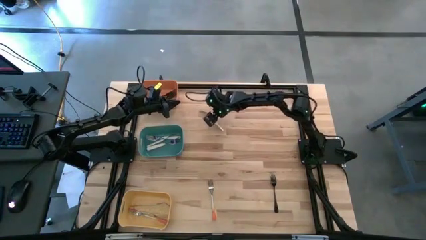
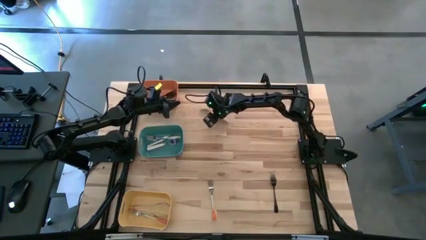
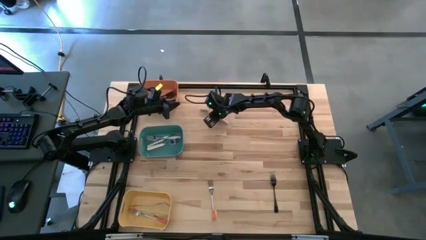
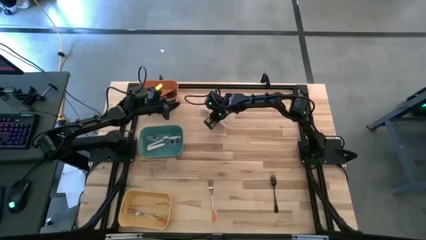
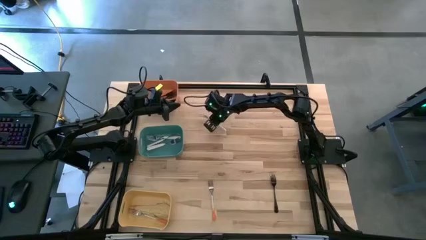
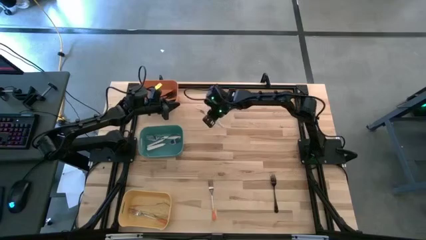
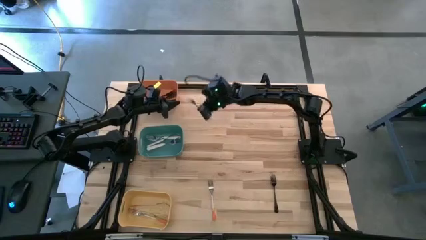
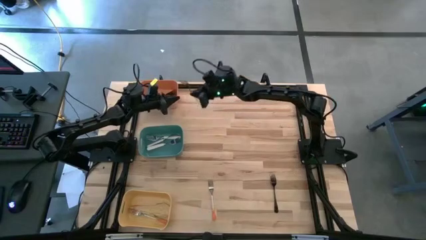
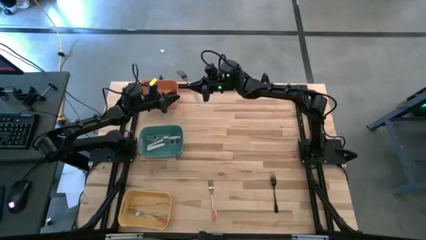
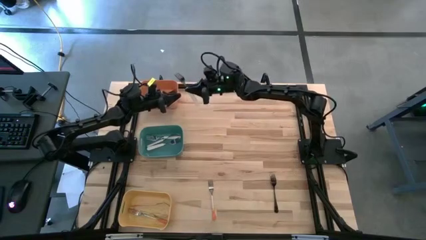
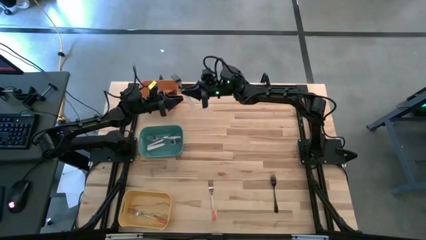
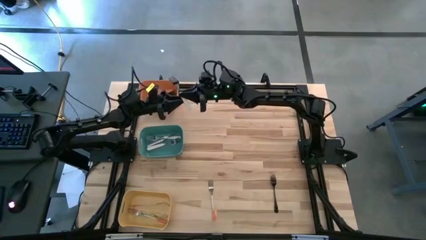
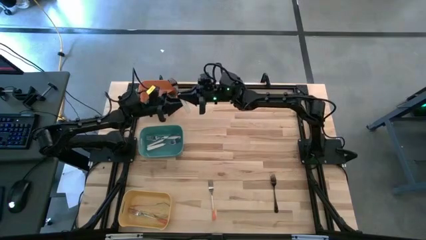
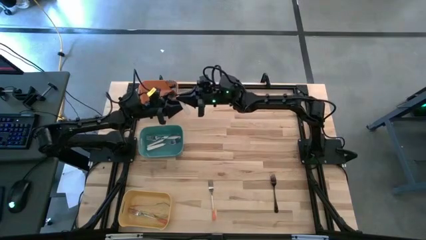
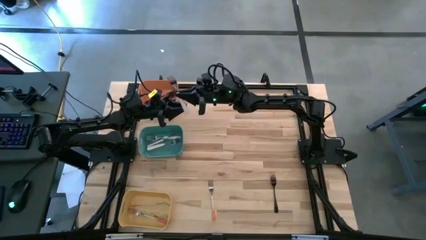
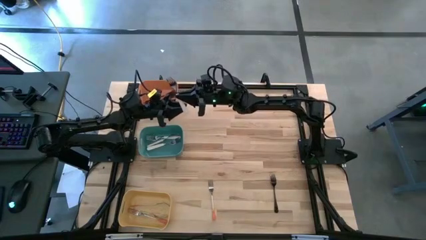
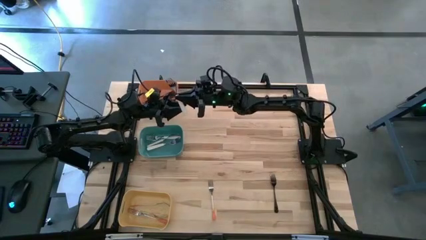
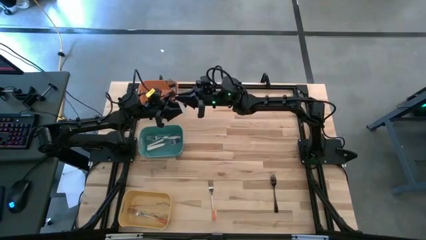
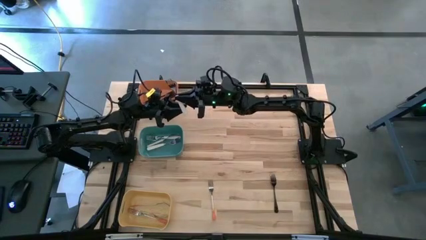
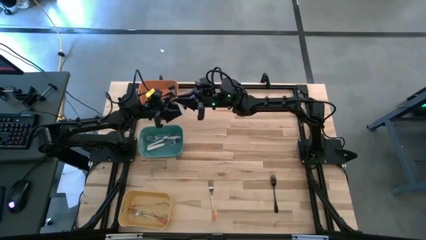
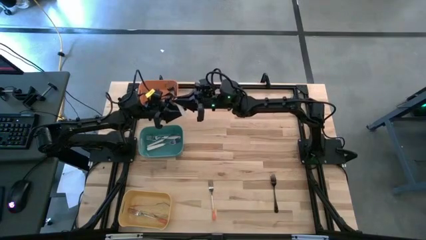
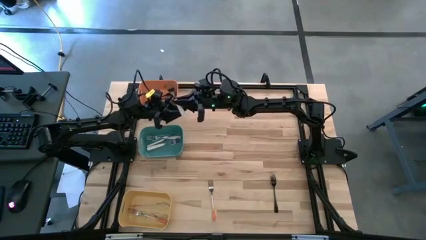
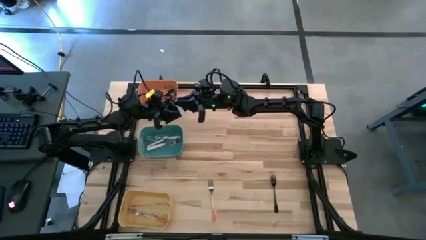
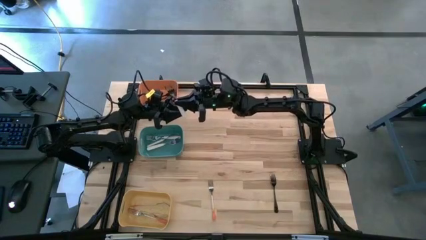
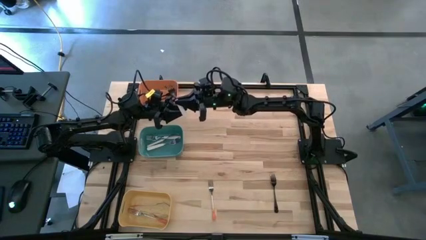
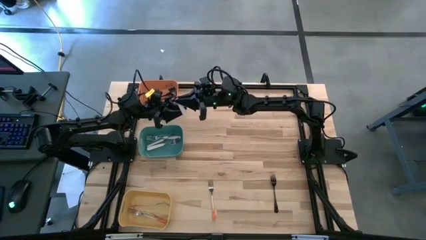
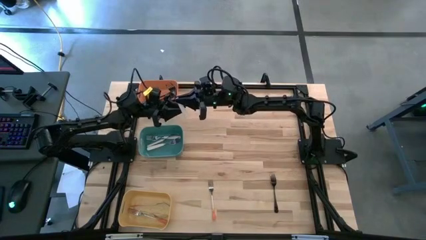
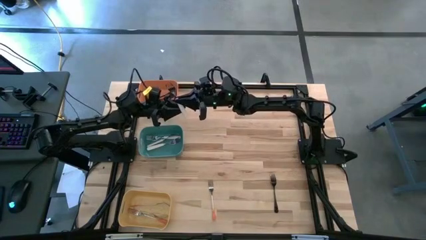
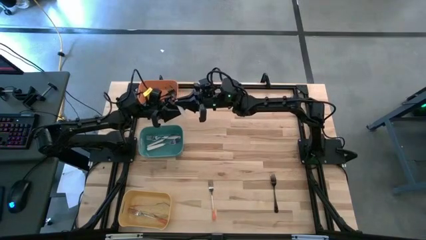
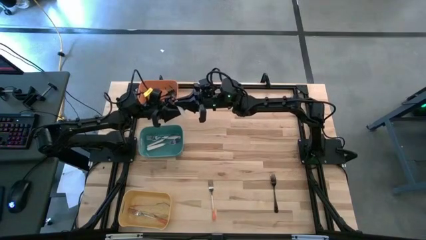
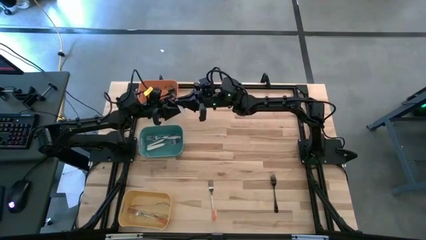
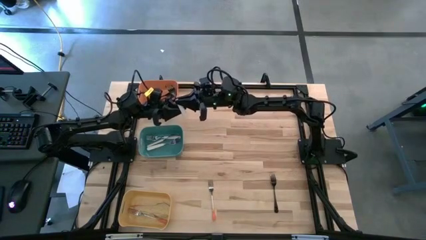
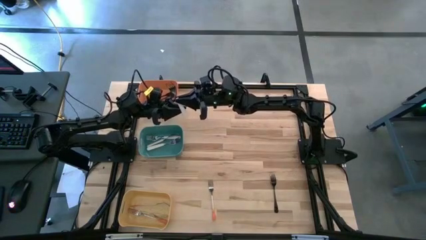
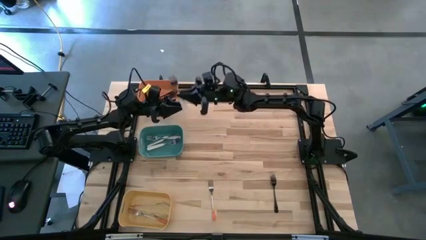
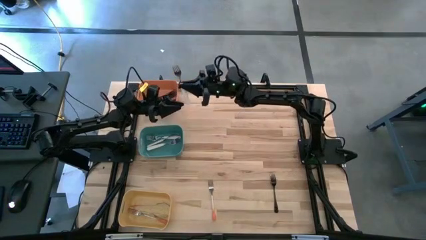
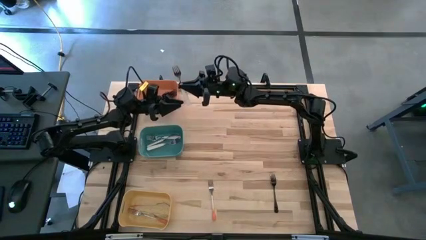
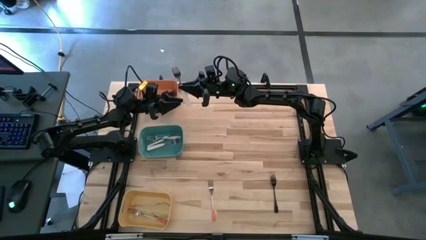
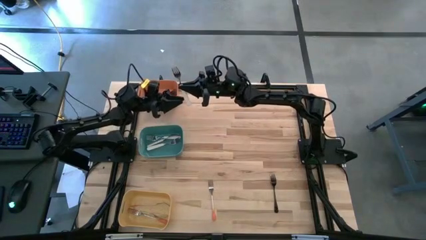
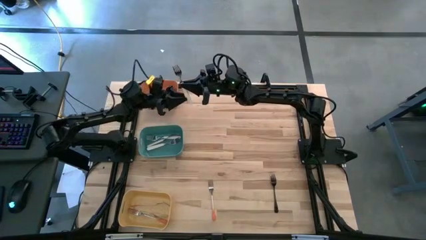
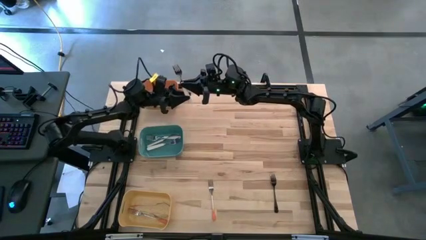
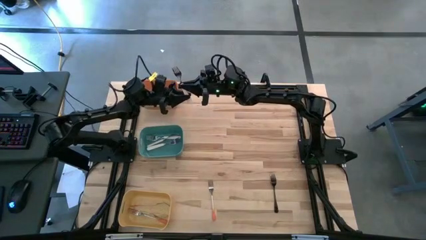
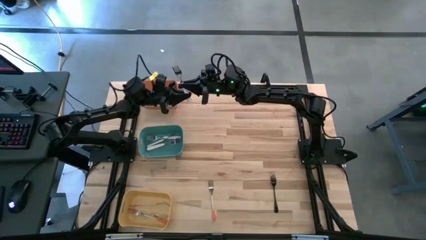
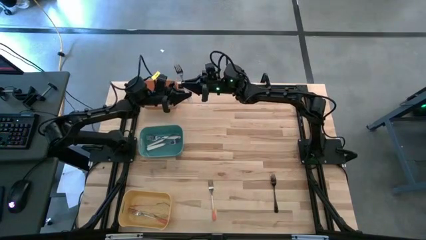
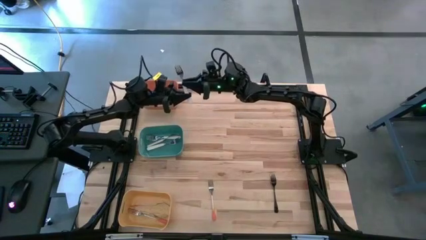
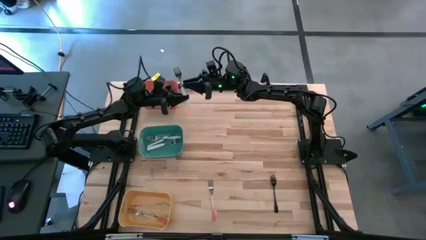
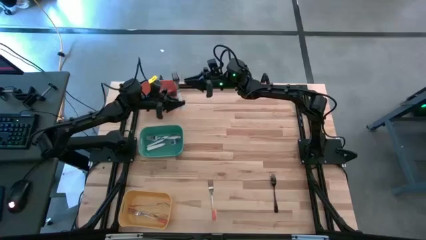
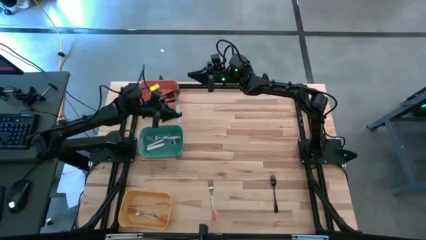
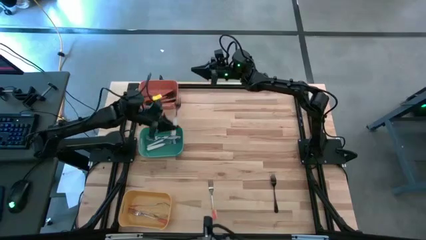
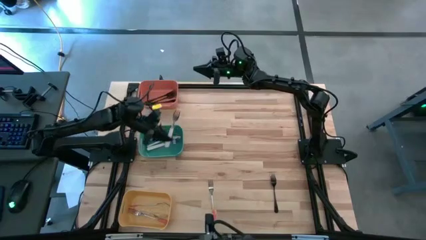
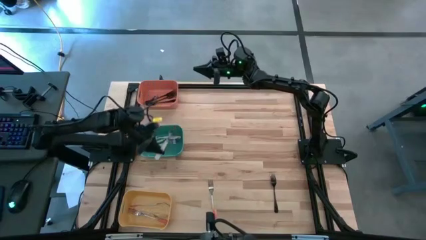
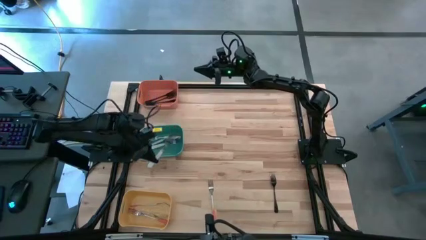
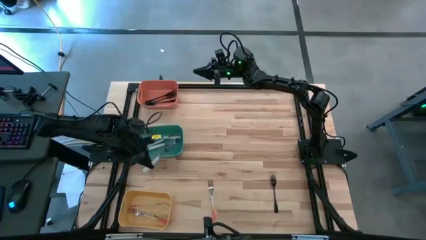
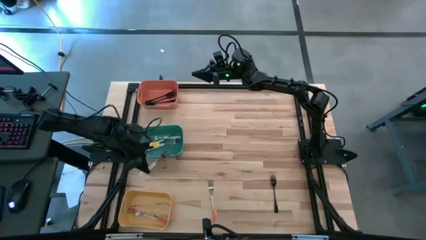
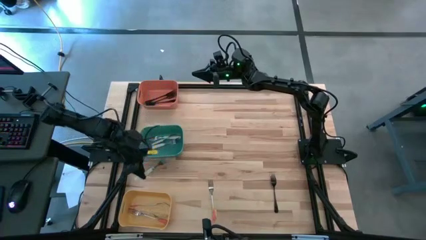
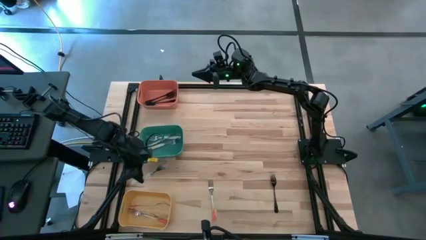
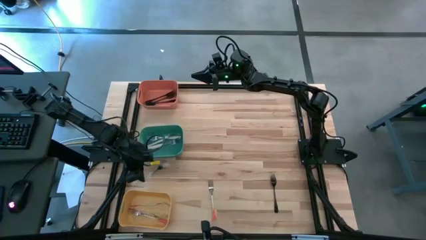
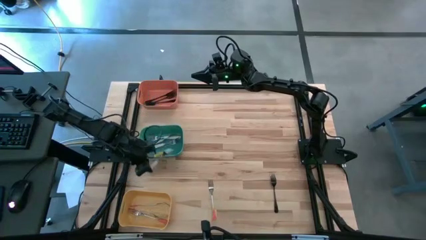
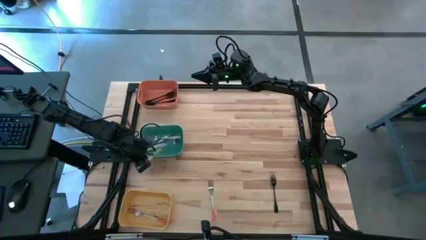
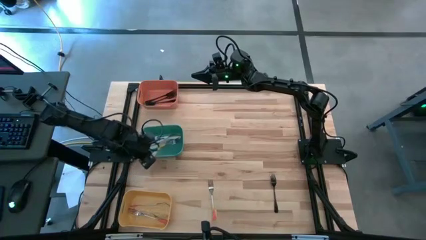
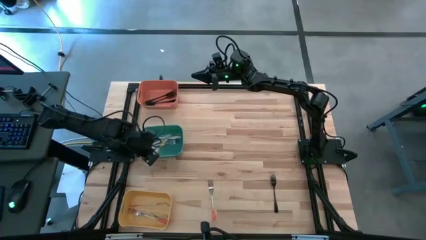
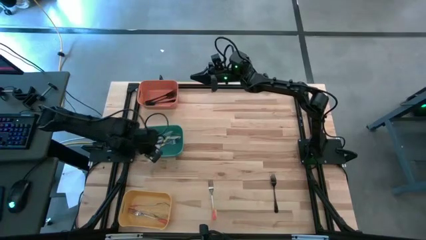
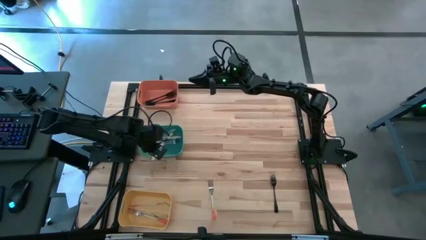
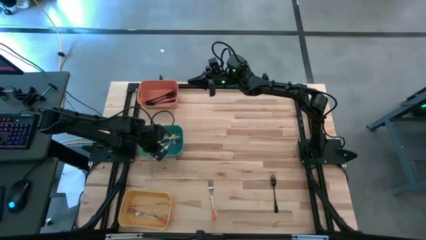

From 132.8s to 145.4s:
Task: Sort silverware by color (type)
Put the white fork into the green bin

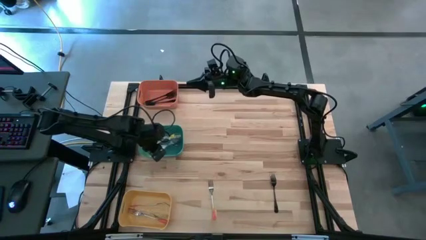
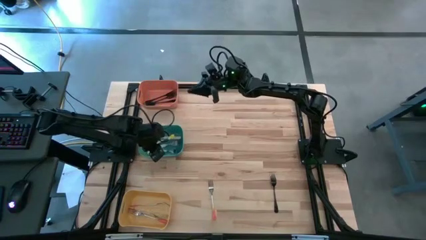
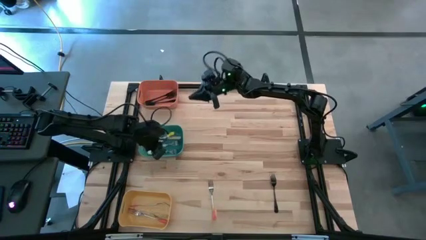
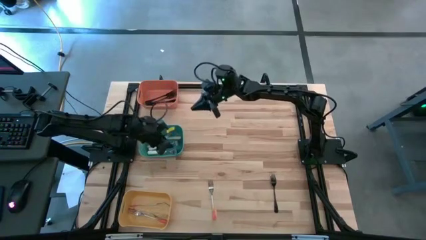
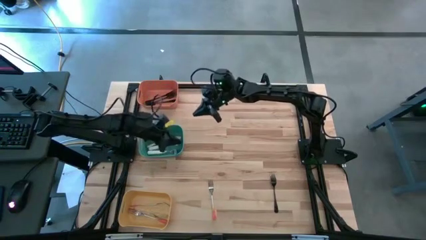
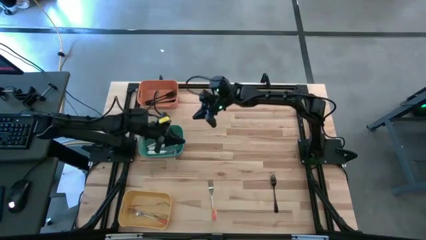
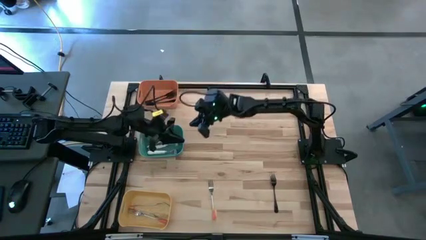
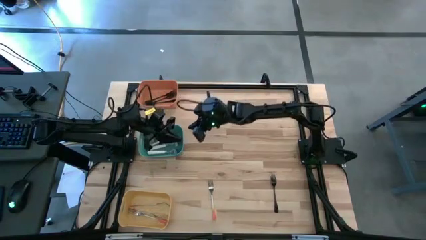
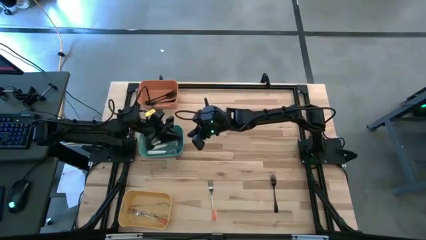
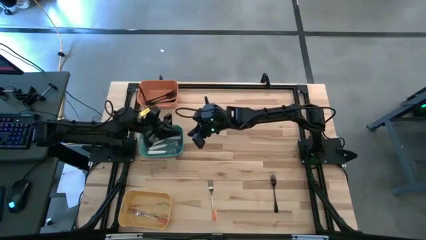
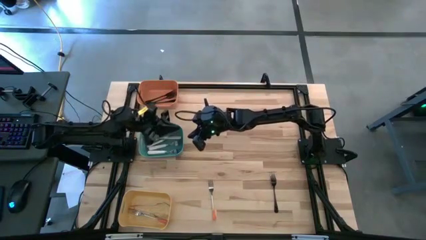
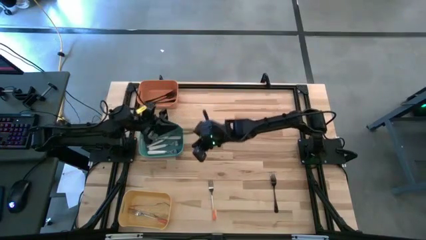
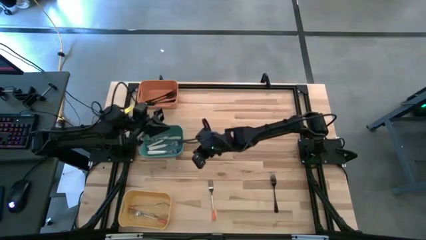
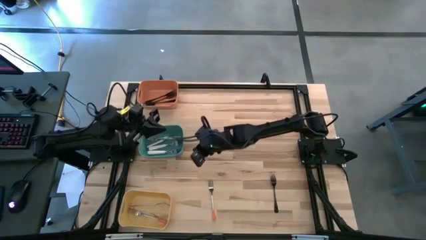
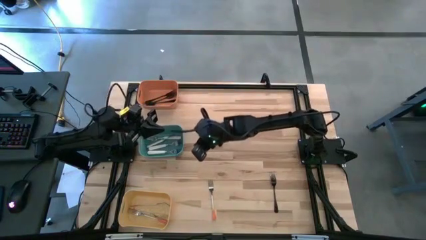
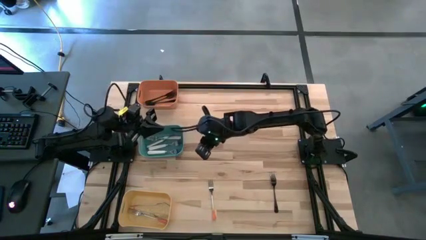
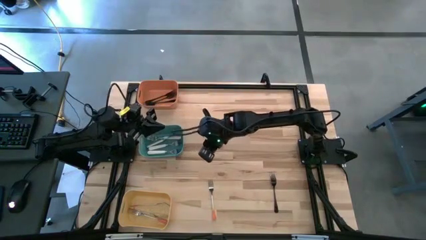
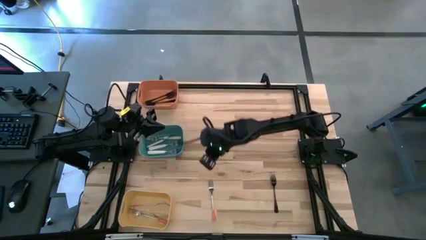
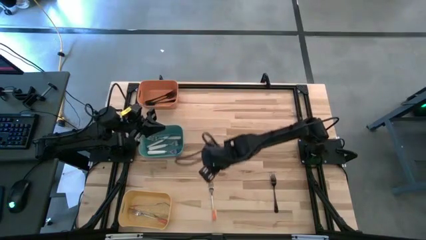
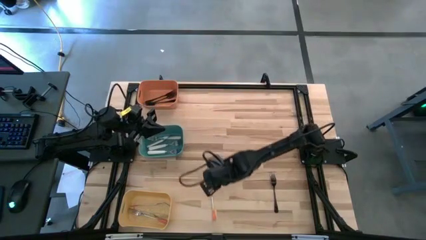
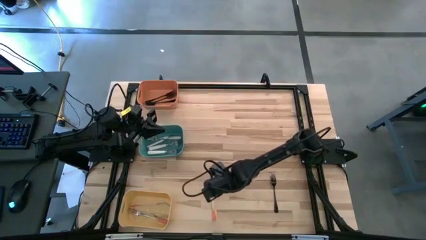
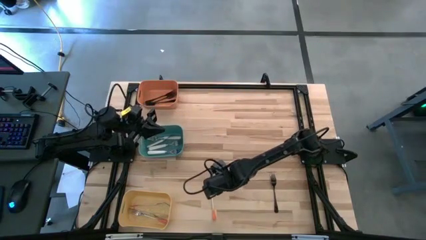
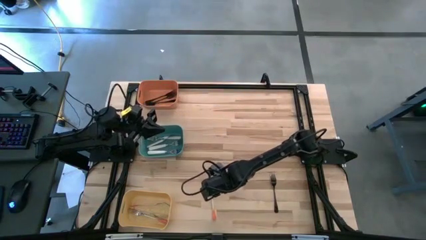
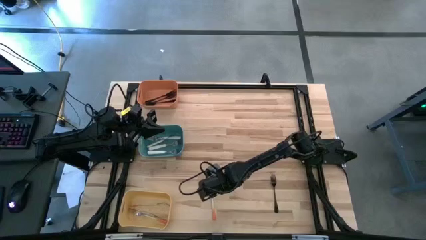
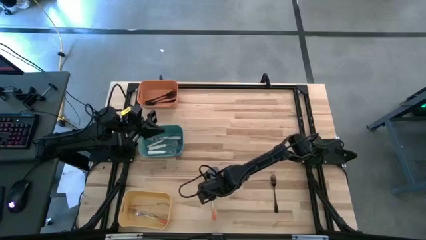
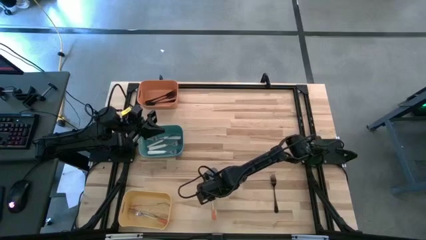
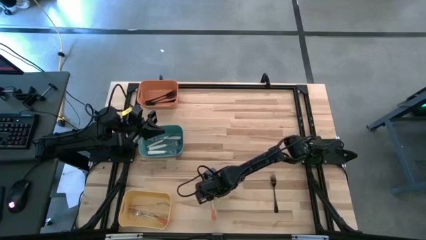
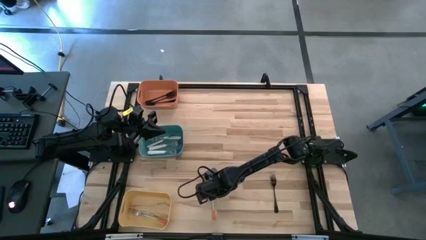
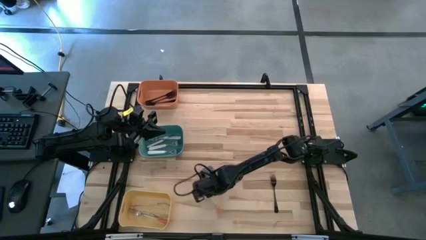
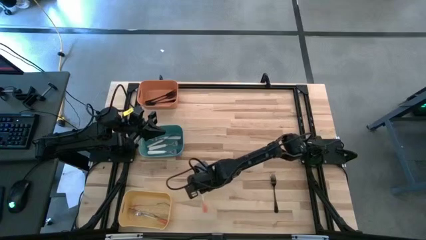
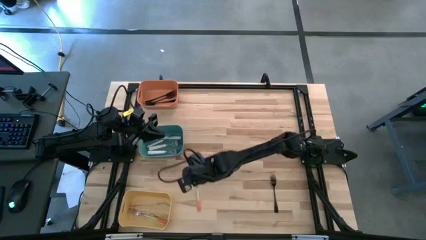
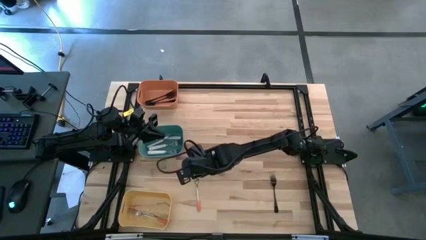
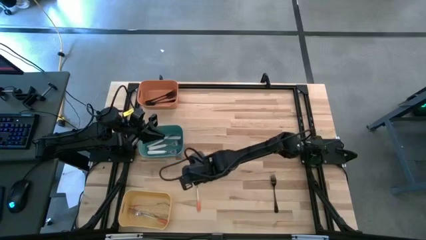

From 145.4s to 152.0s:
Put the orange fork into the yellow bin
